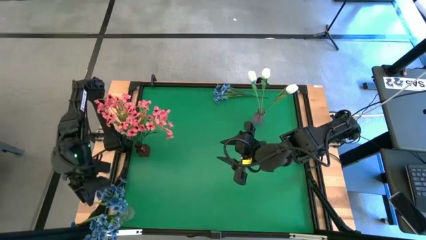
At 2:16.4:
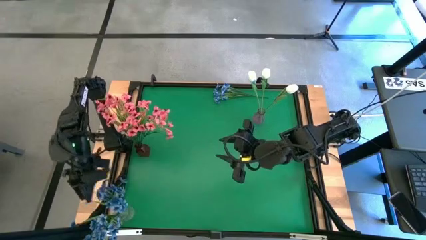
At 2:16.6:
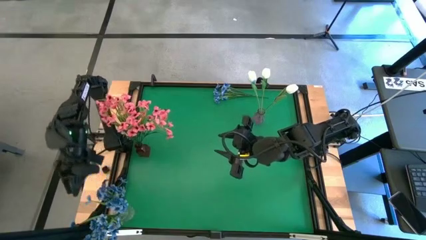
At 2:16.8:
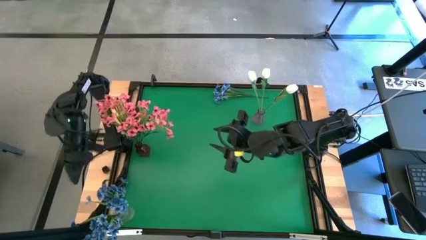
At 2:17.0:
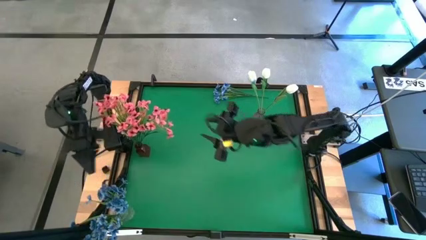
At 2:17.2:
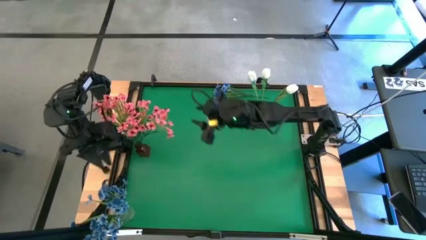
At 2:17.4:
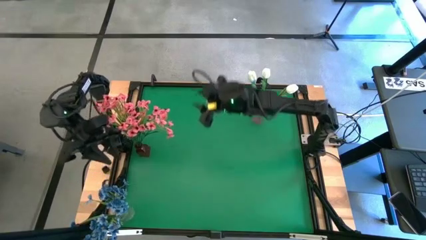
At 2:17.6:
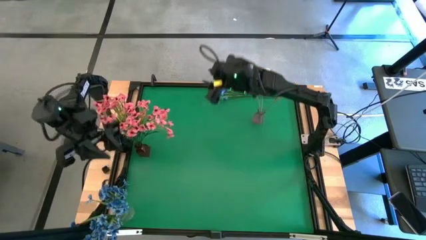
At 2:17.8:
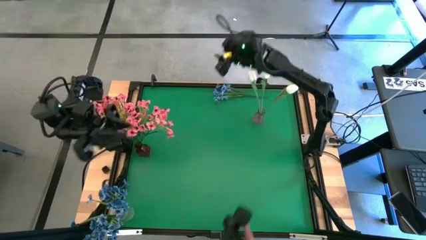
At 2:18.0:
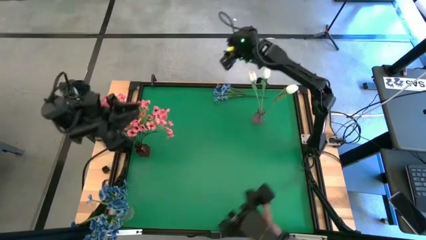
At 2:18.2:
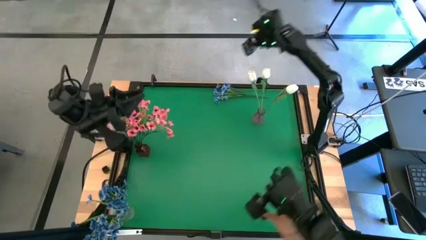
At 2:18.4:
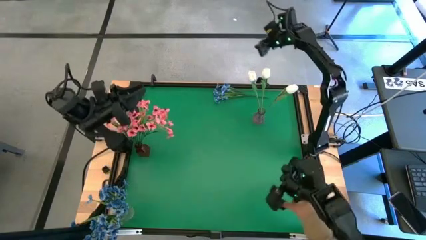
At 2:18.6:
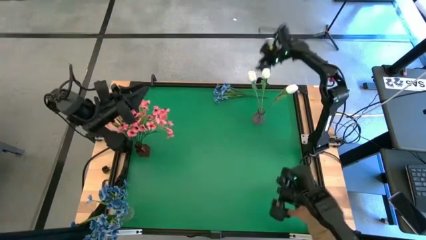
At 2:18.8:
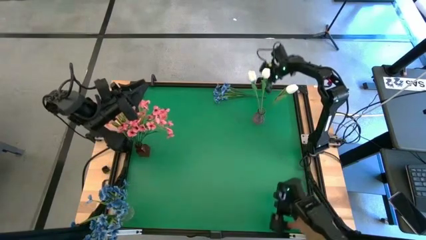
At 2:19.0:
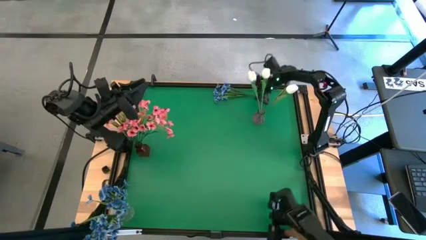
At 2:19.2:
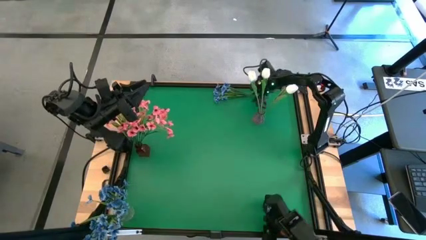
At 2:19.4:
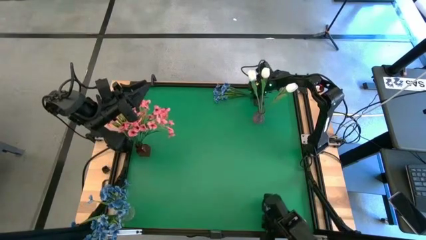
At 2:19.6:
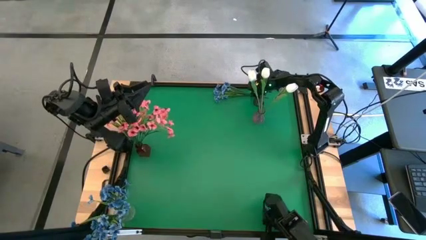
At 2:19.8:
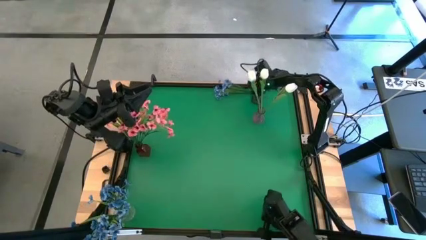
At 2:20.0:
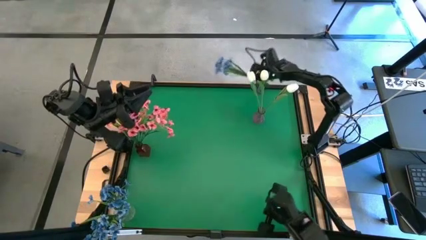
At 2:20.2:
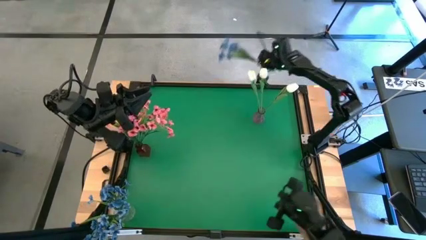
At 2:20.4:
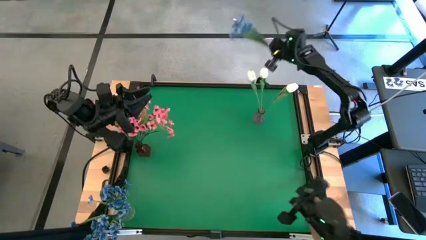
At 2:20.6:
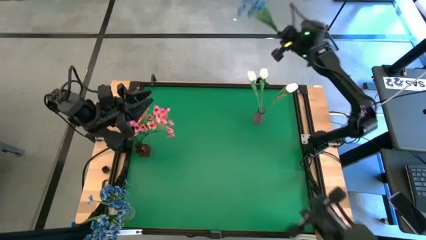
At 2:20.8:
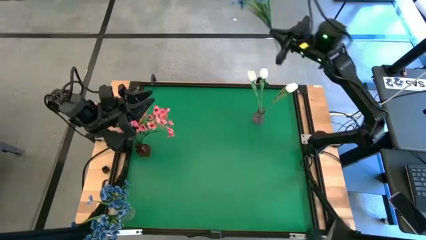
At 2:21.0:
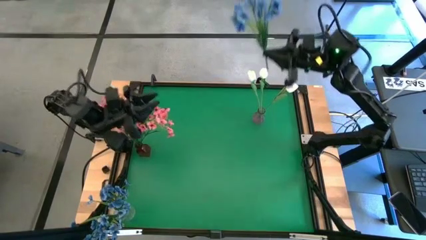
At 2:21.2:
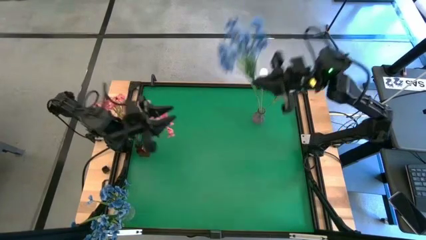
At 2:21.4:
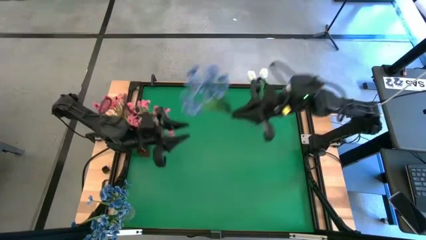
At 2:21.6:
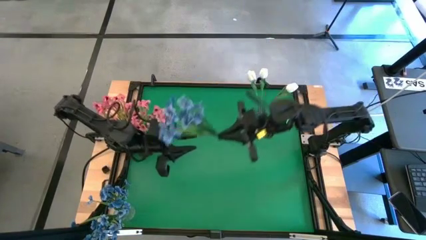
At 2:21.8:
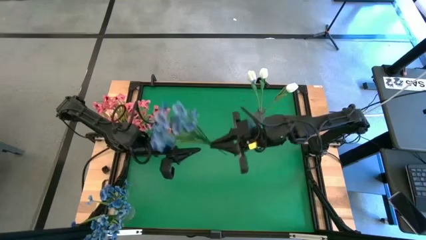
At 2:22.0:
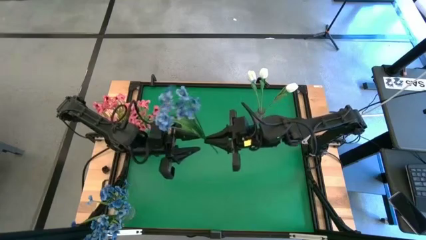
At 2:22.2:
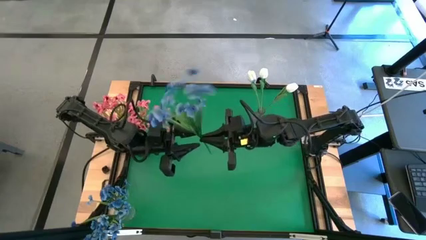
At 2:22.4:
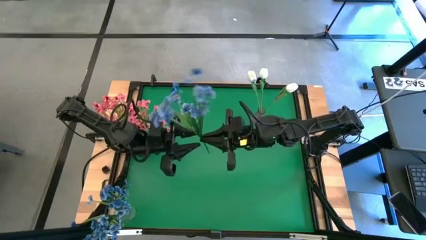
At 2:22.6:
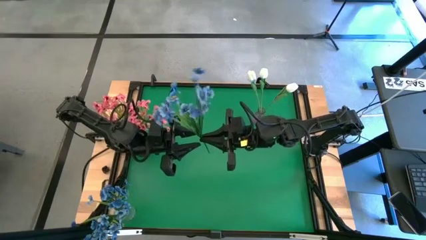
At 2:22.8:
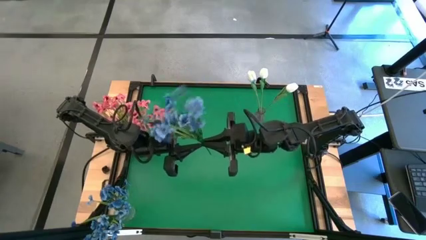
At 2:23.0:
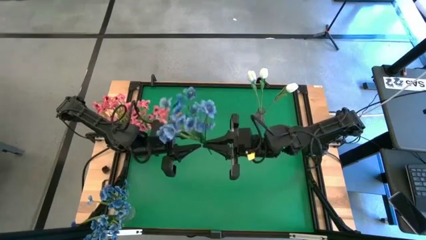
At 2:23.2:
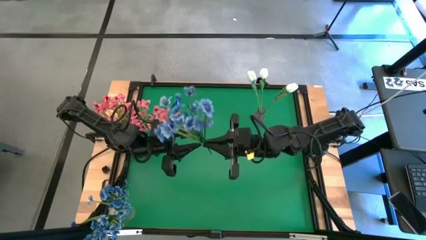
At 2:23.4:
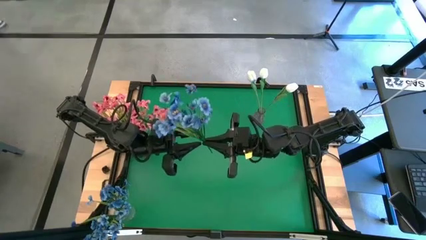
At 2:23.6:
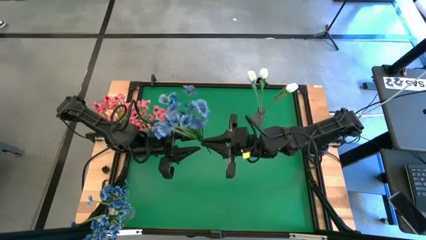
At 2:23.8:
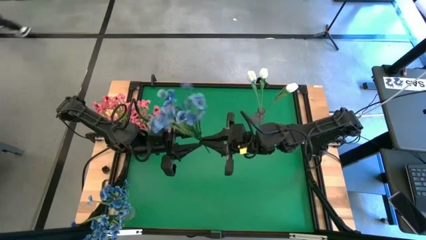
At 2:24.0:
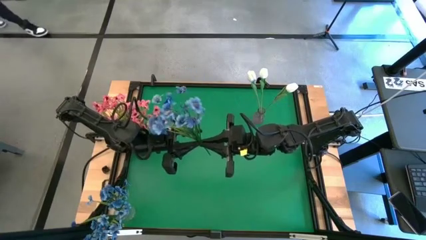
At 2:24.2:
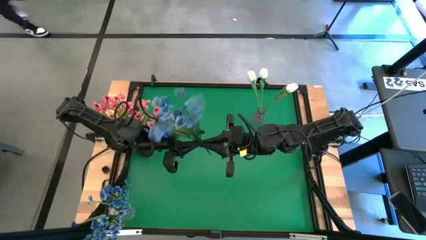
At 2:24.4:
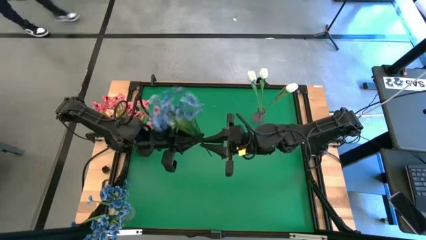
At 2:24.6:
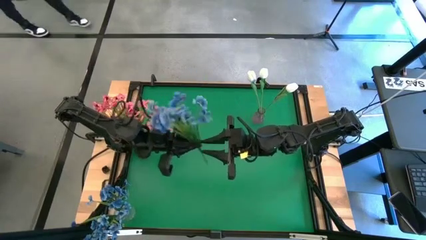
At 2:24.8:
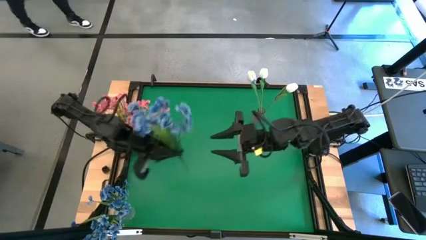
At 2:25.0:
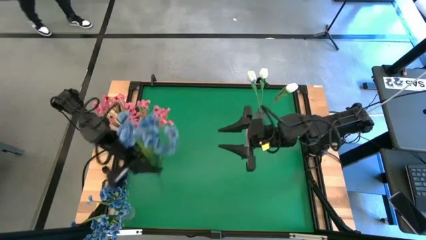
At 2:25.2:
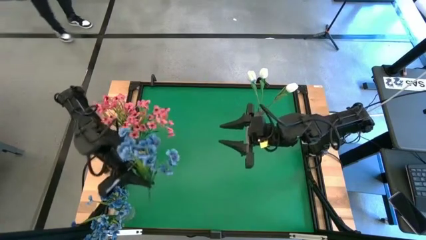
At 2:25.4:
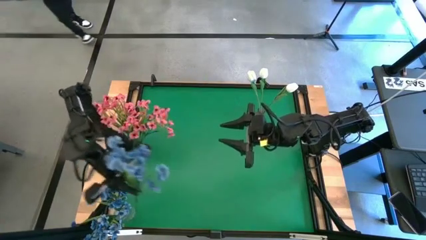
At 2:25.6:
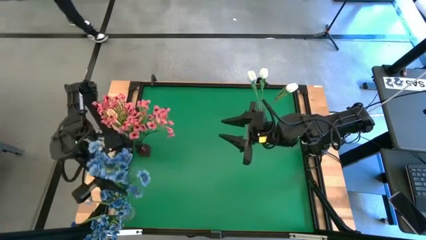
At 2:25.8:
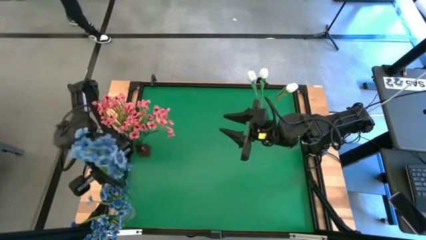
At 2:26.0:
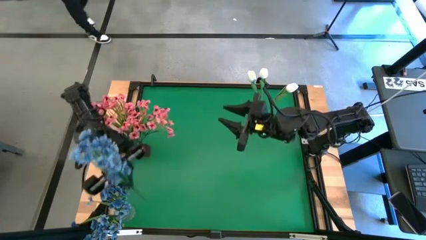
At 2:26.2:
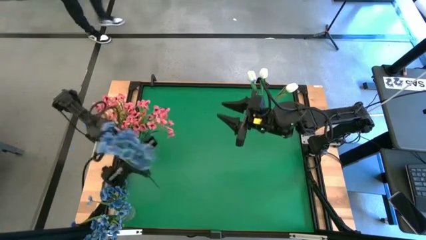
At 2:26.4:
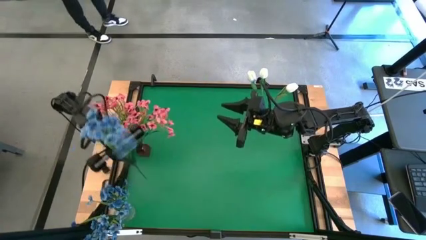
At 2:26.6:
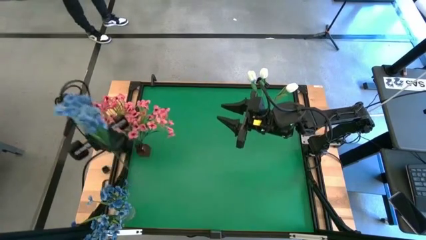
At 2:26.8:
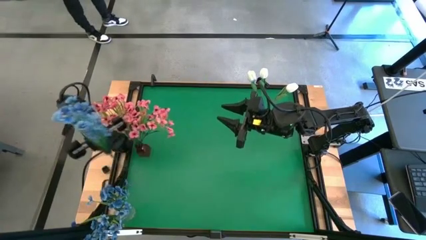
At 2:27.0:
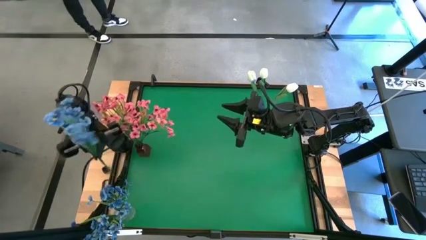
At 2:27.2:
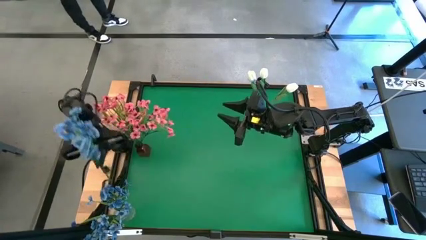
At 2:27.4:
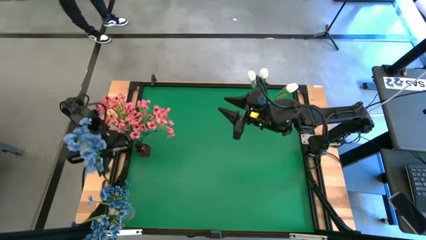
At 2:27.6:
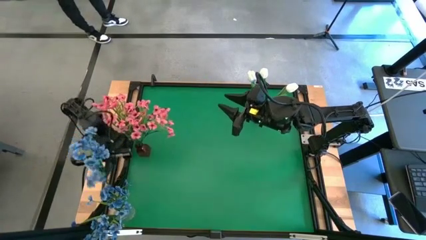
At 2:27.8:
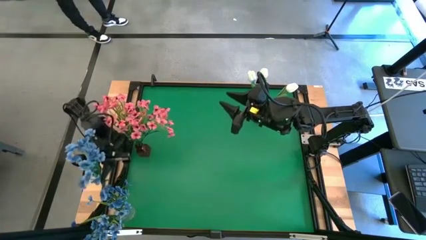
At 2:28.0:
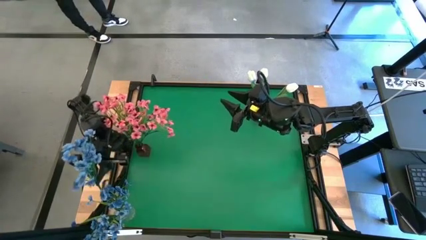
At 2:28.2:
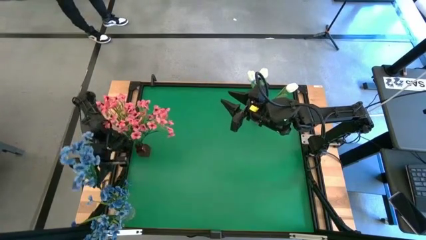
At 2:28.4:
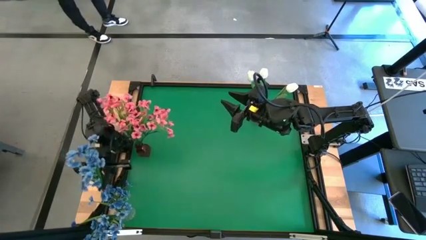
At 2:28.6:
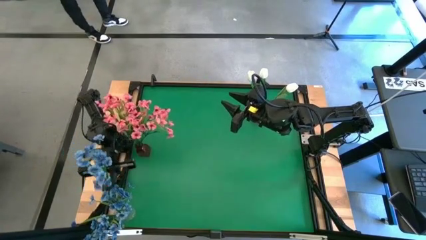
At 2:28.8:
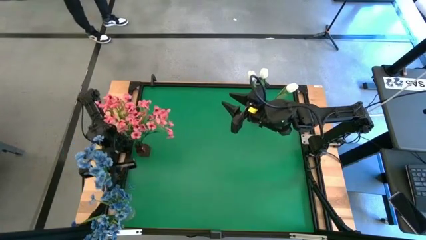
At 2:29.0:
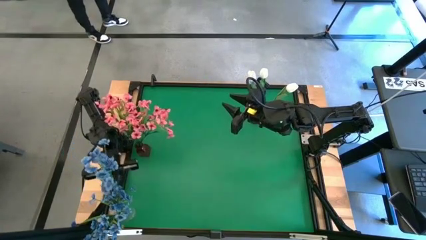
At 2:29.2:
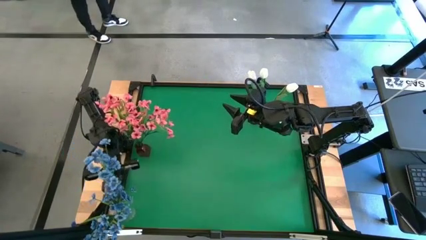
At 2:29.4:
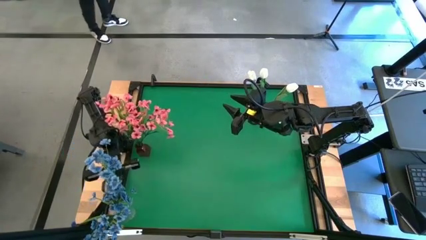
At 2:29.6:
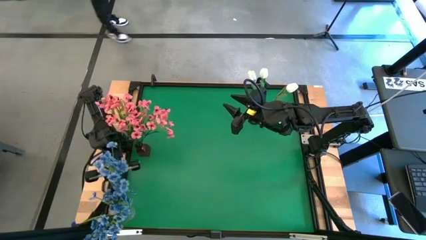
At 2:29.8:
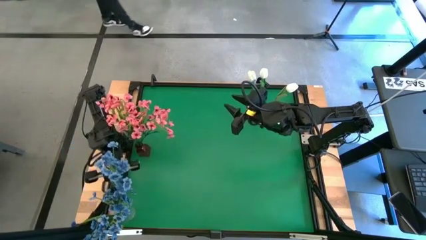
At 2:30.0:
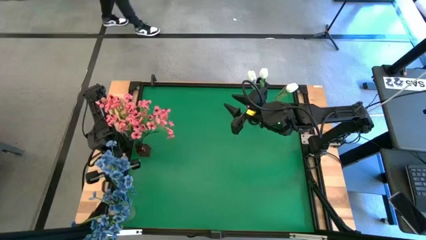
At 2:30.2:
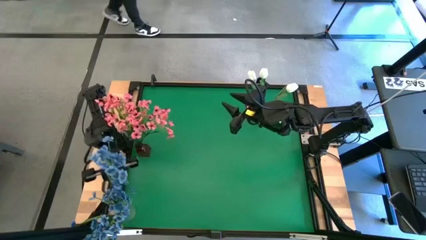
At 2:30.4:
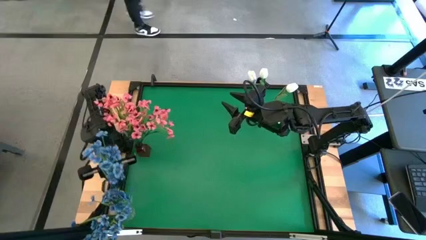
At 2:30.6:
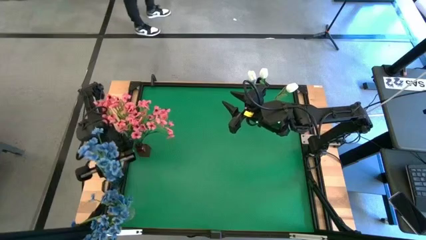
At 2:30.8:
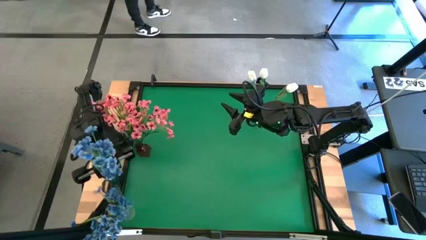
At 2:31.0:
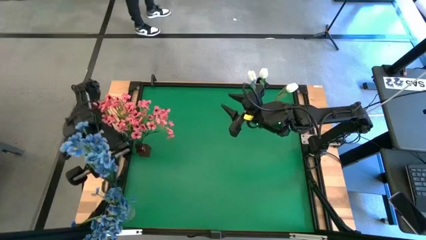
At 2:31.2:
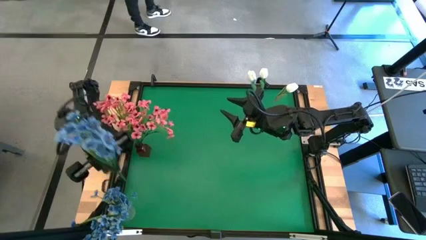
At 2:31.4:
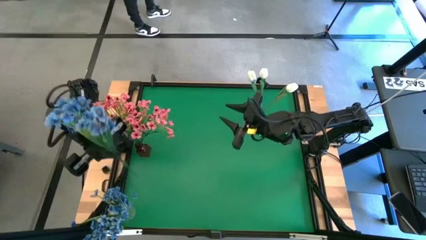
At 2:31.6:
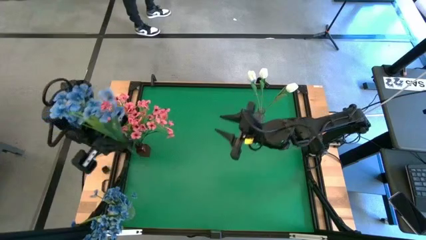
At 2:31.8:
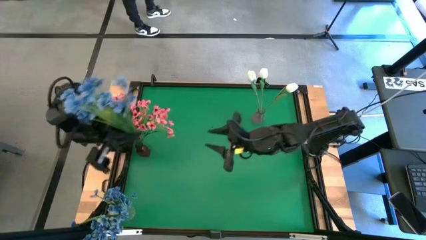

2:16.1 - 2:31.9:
Task: Sort flowers into vase by color
Put the blue flower into the transparent vase

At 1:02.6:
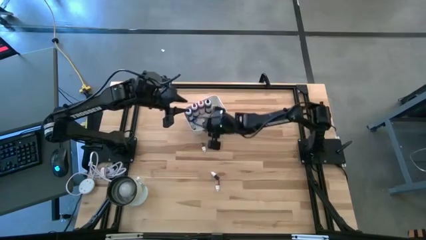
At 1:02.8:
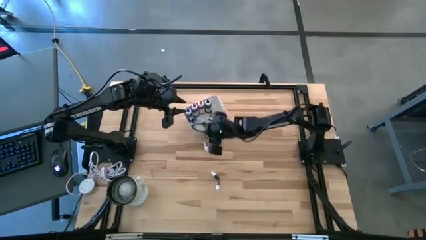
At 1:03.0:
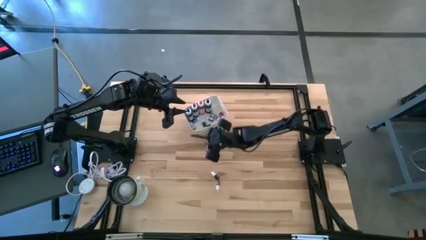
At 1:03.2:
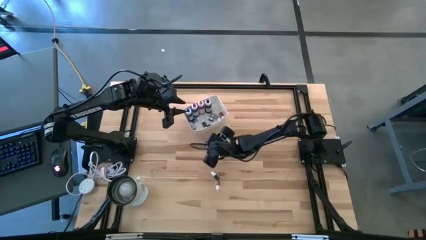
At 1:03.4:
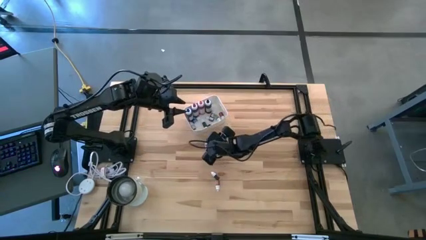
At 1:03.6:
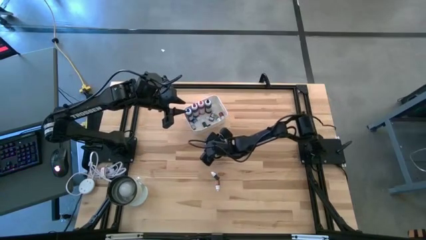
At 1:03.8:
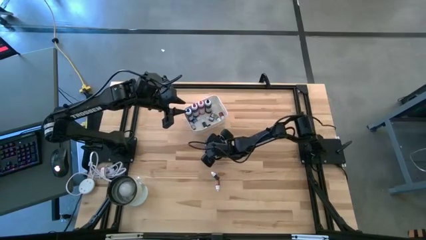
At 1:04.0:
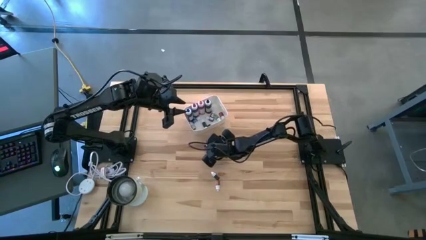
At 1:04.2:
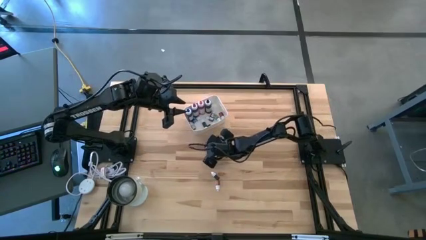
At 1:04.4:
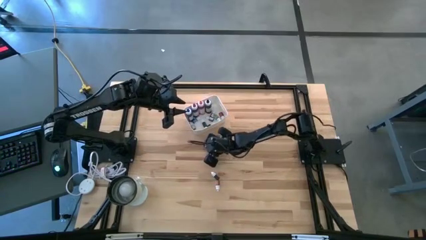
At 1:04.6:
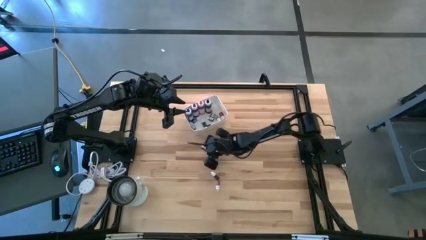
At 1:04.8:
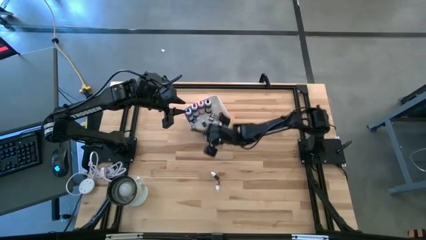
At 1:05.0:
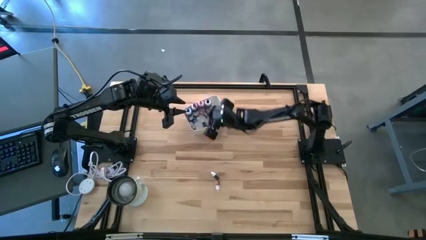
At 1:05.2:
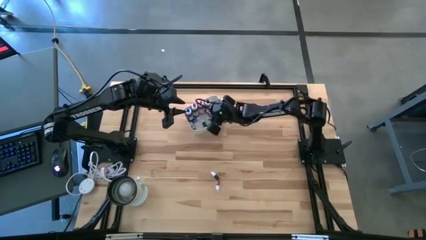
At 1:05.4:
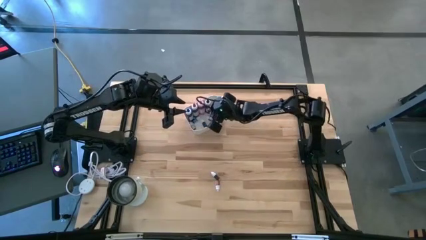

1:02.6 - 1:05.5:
Task: Pick & Place food coloring
Put the small dark green food coloring bottle into the white bin
